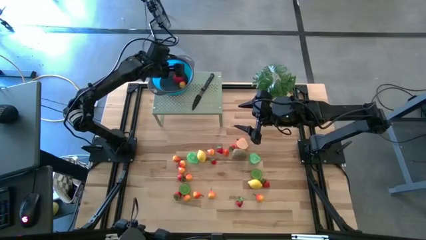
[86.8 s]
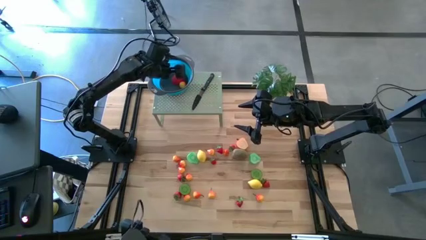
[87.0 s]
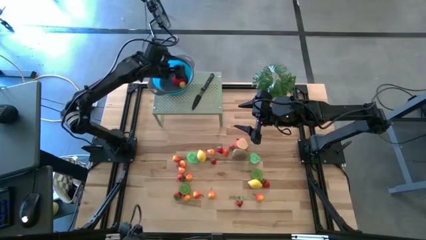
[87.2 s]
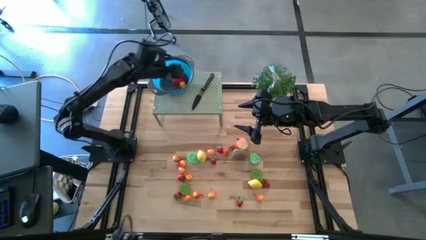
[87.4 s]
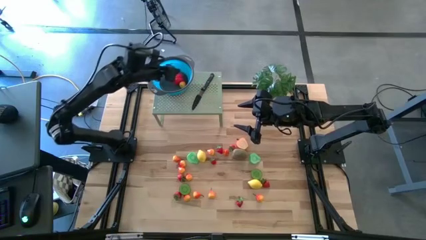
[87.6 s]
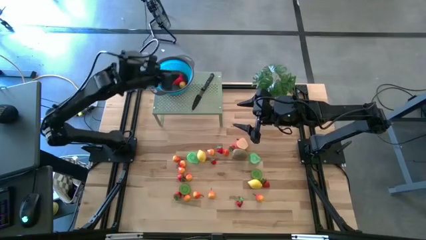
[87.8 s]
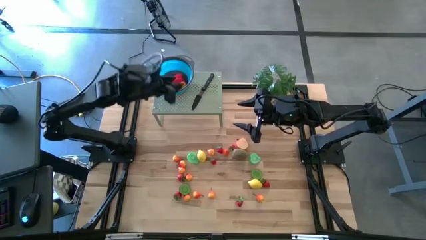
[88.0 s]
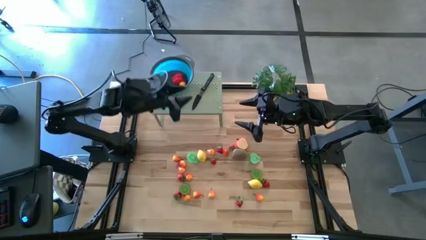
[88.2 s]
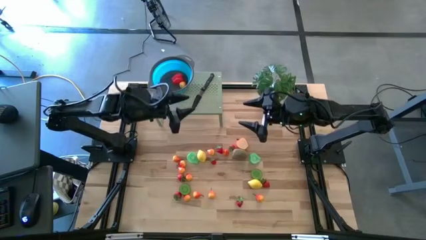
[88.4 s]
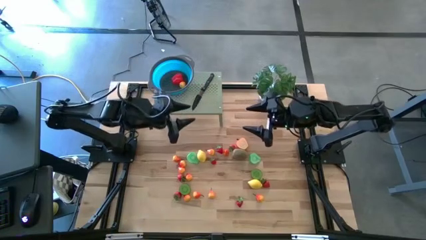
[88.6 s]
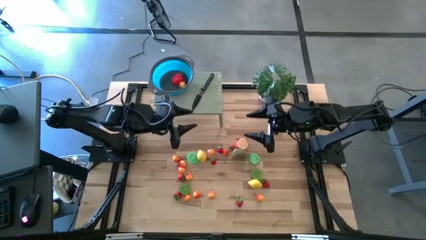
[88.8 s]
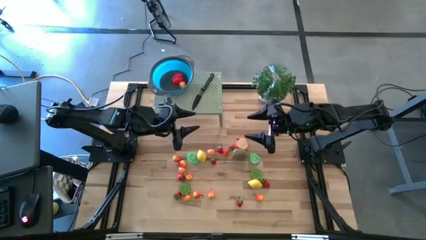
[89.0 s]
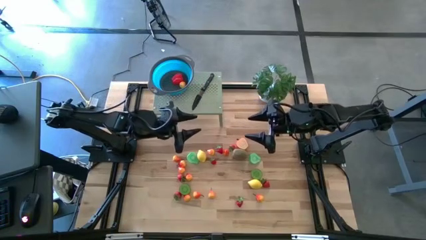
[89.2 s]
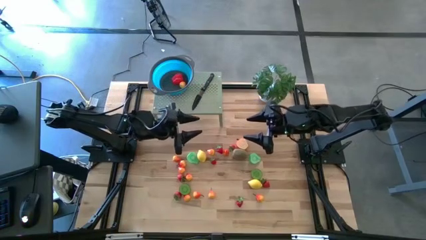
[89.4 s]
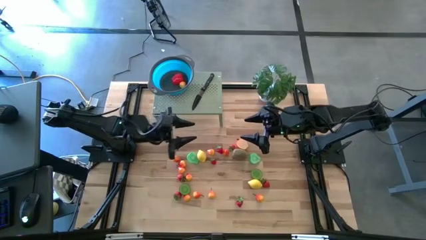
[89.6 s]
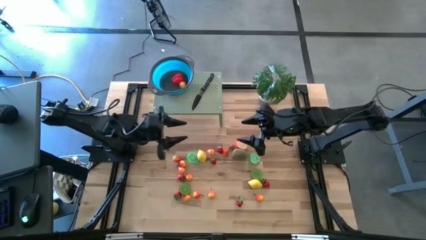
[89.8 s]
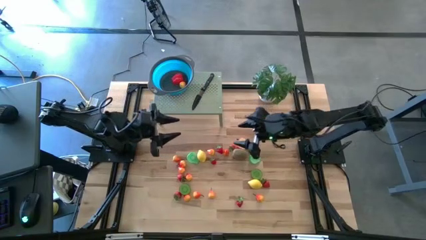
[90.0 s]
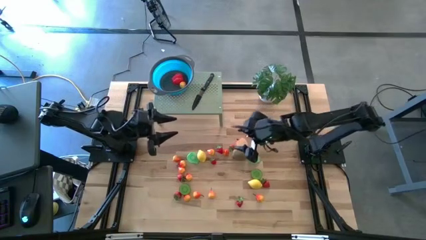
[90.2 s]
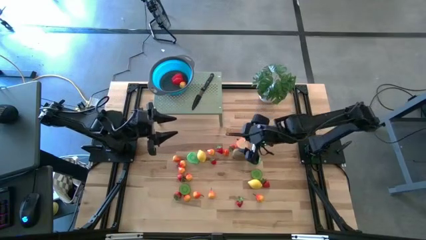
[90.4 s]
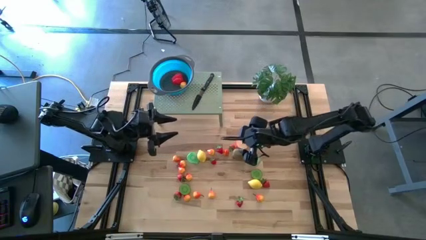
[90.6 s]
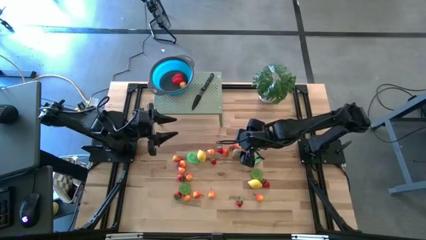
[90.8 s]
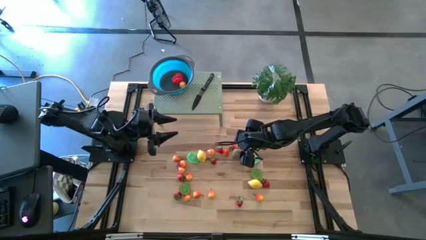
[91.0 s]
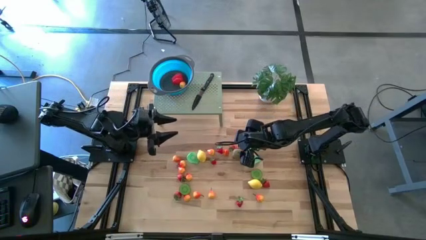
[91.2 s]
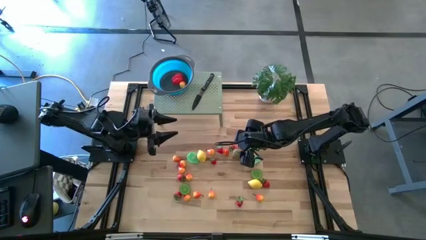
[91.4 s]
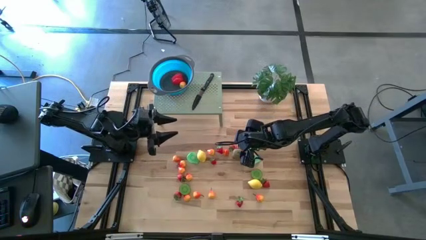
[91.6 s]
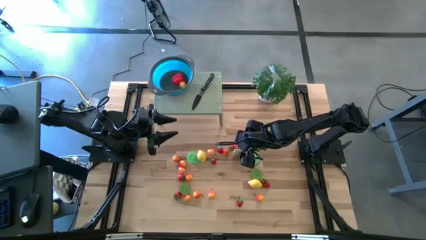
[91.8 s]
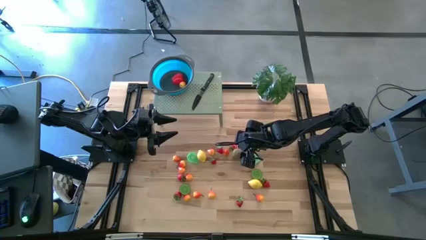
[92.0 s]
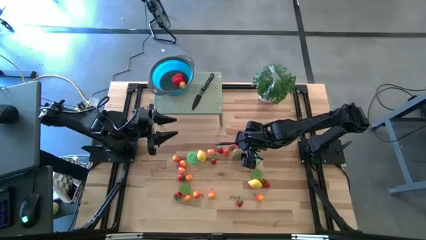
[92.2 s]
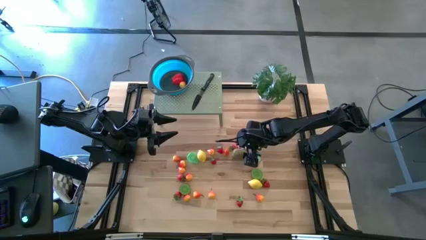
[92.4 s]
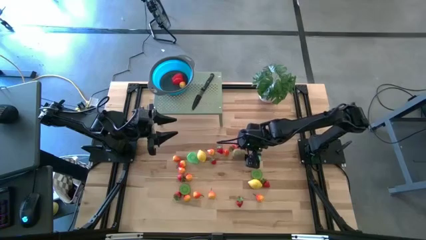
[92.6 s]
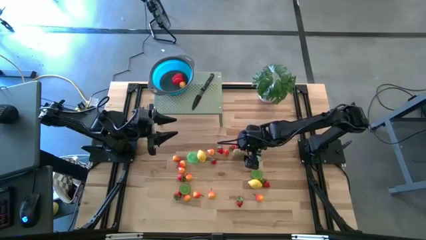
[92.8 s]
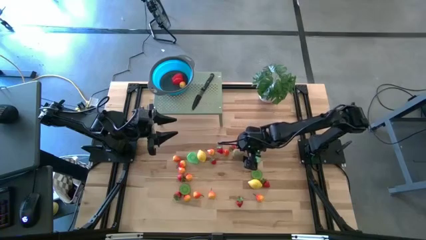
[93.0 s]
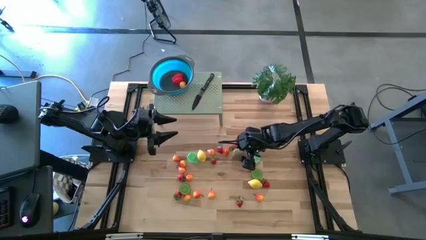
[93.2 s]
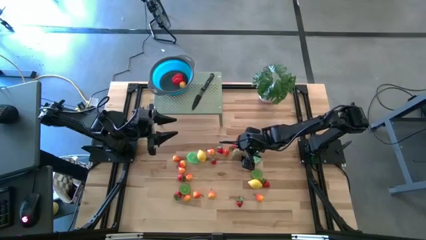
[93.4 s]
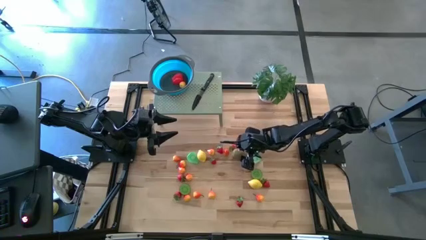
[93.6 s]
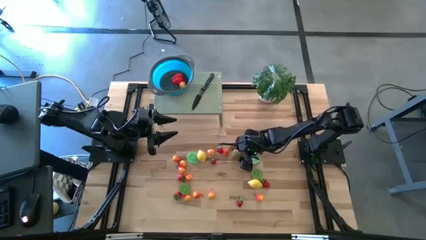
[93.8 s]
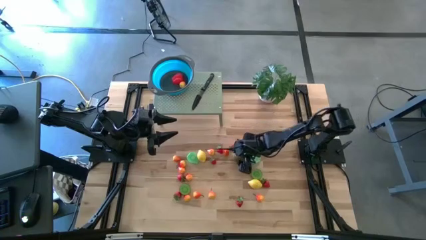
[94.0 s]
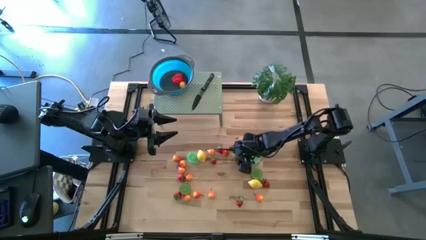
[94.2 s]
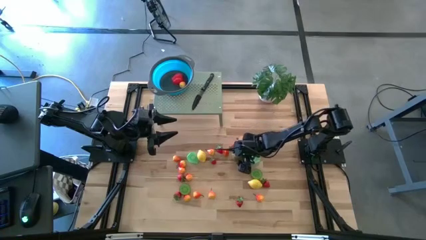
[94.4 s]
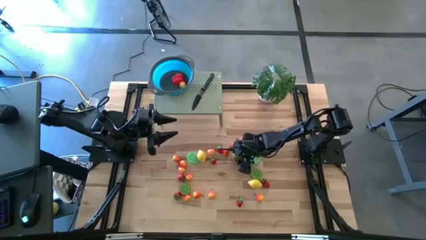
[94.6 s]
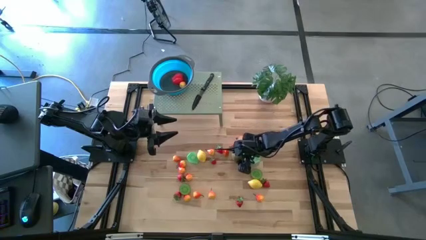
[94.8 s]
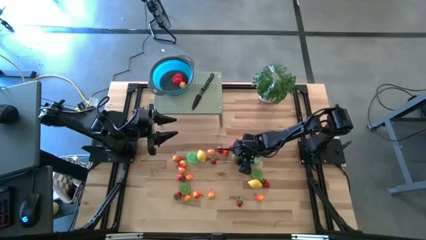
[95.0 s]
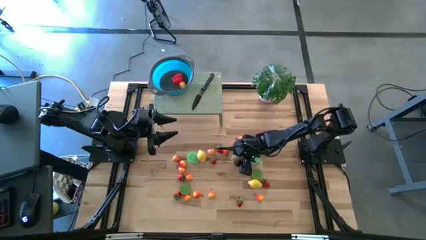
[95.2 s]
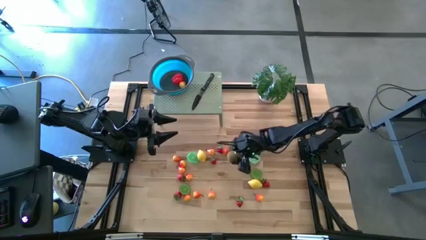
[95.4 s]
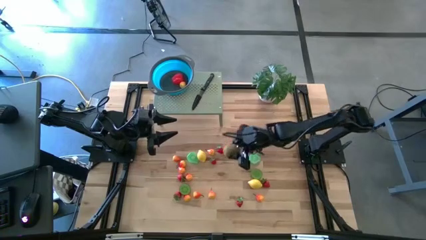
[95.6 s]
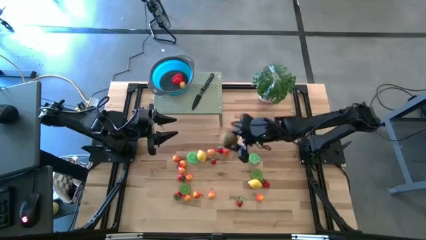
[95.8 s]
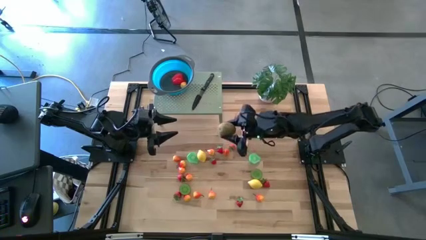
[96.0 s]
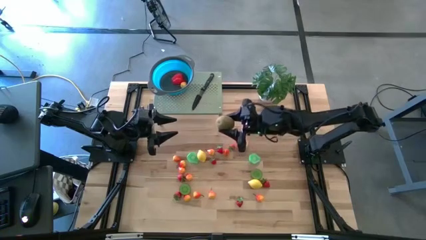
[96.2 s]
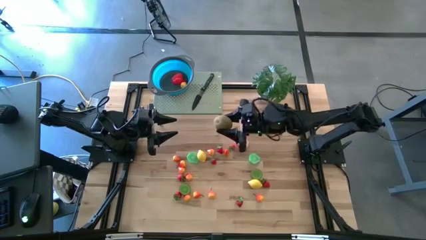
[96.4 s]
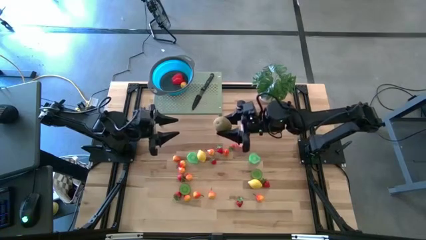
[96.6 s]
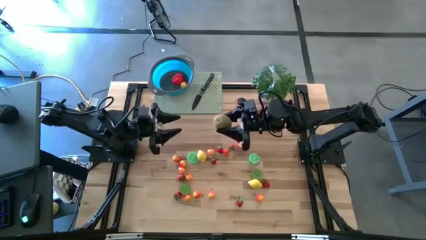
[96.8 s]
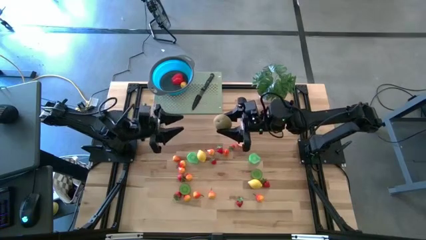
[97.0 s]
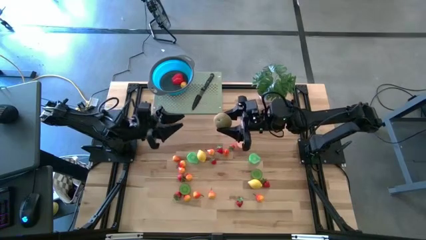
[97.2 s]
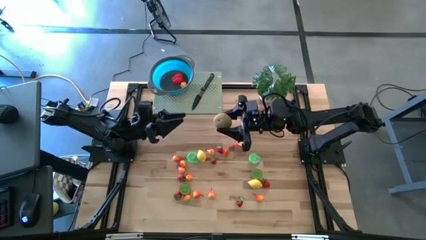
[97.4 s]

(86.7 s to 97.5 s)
Task: Pick & Place Fruit
Put the kiwi into the strainer bowl on the shelf

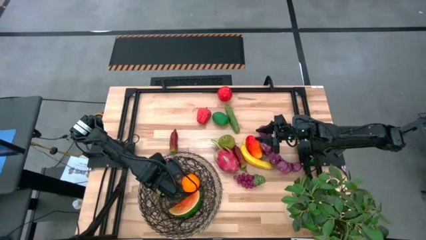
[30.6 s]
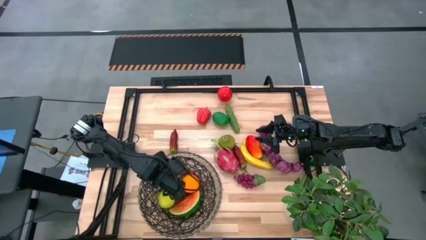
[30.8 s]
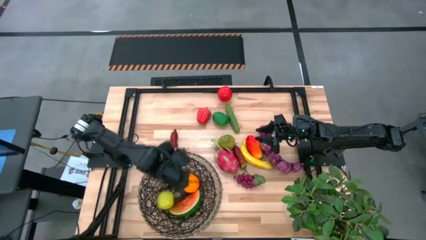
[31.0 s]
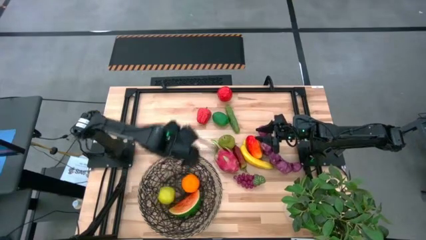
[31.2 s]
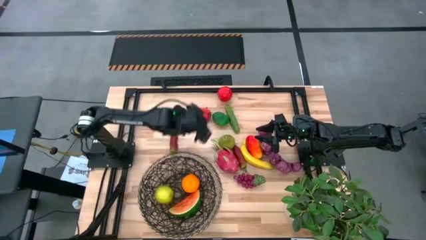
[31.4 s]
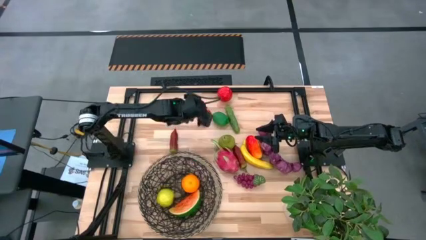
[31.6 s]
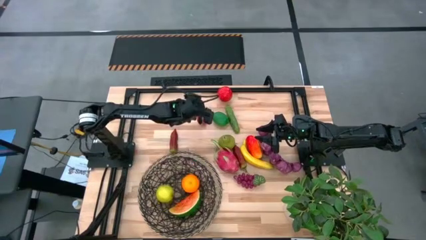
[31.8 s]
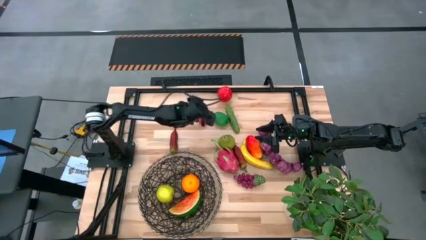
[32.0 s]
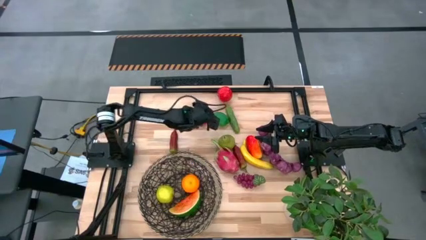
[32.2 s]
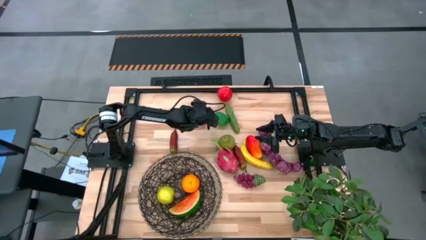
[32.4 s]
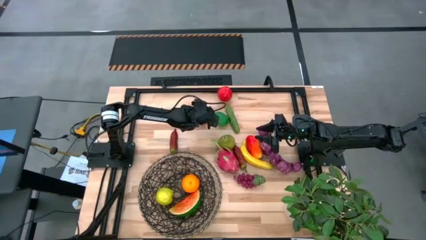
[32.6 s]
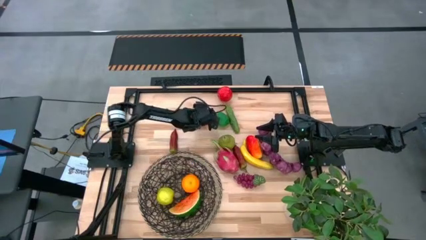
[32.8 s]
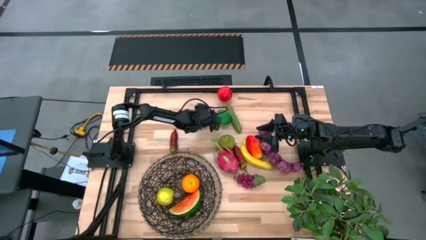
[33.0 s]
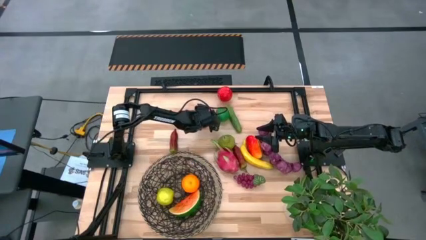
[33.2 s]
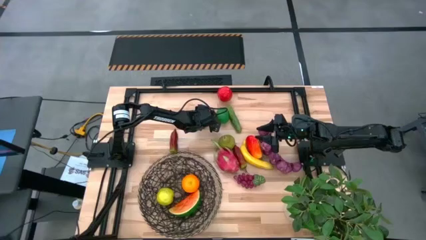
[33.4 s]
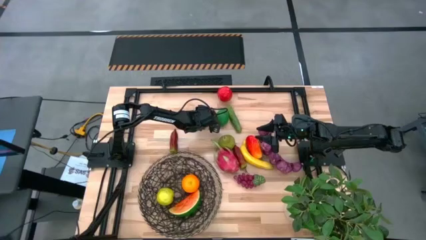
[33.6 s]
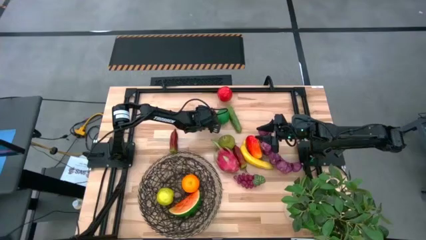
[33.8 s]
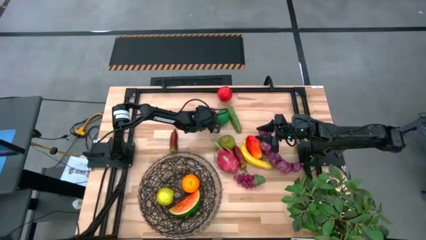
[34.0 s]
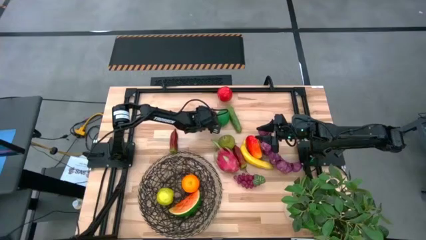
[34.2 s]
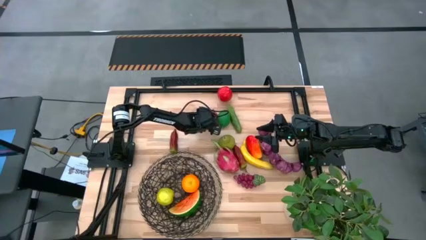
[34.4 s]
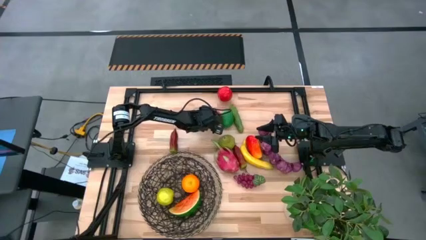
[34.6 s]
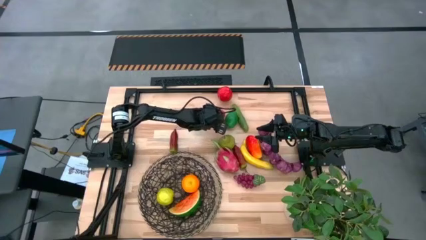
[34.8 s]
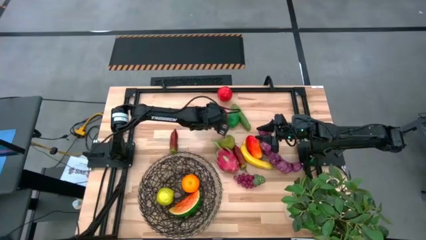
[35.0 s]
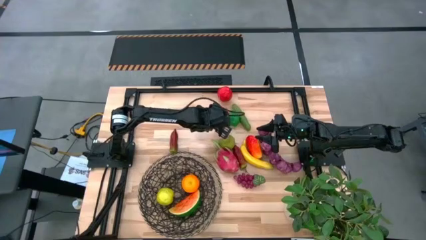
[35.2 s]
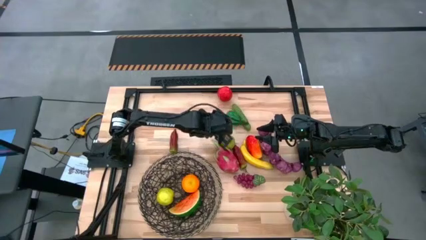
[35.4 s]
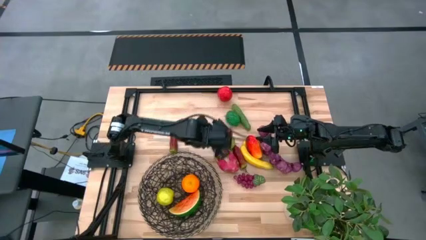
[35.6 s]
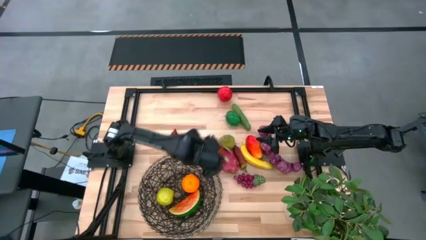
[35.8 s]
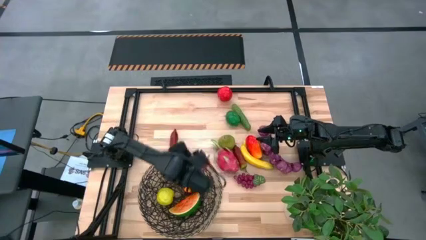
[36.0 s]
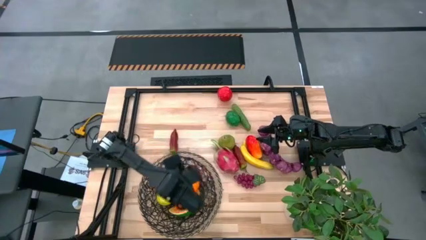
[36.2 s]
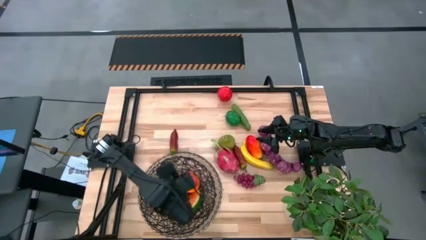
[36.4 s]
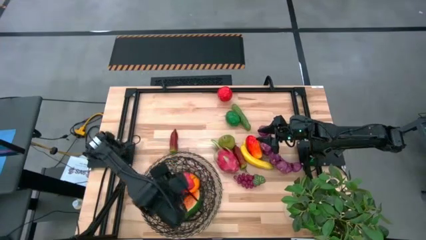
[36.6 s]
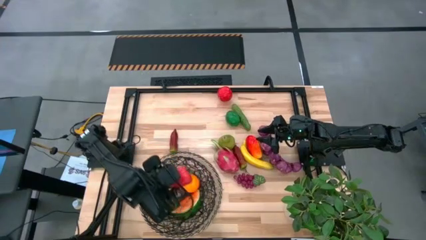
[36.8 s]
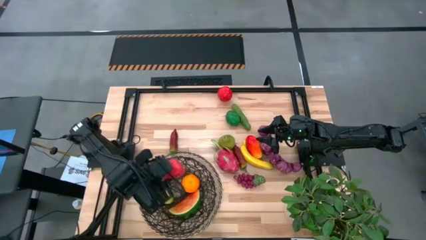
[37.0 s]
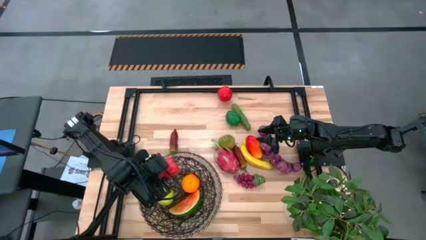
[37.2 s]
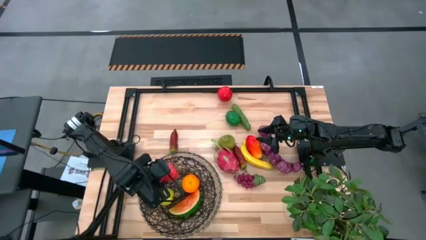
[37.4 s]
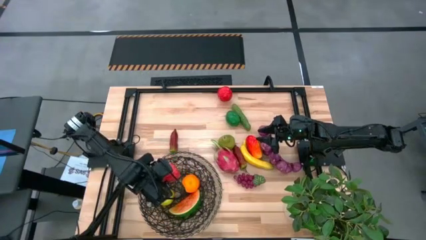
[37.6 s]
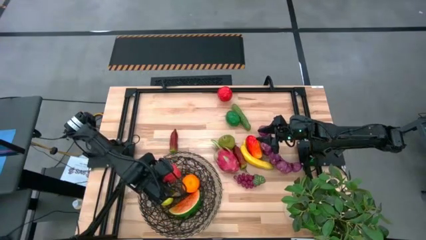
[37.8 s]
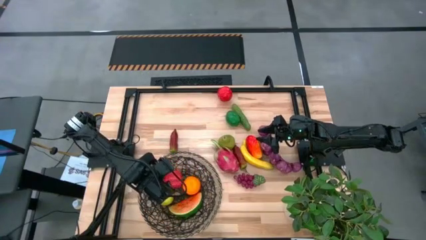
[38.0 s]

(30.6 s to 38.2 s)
Task: Build produce basket
Put the bell pepper into the woven basket
